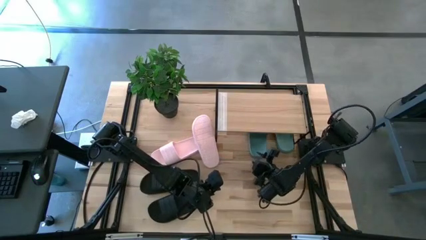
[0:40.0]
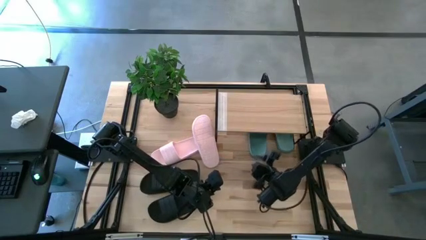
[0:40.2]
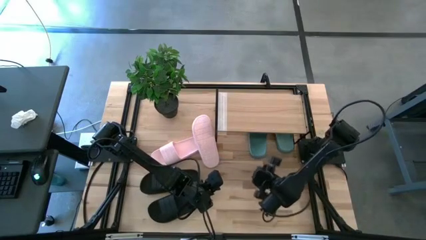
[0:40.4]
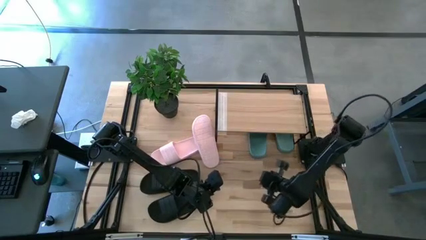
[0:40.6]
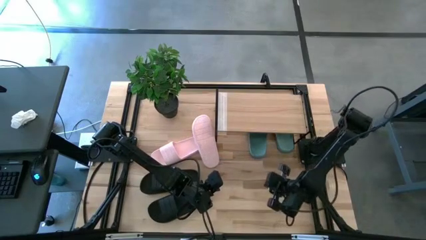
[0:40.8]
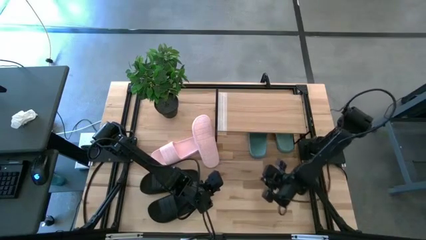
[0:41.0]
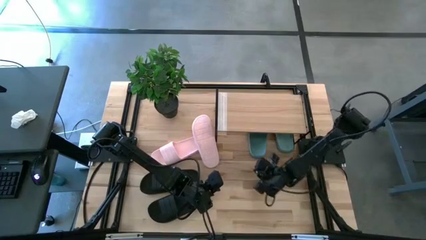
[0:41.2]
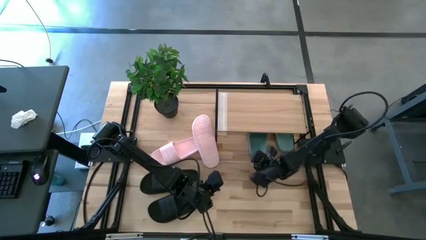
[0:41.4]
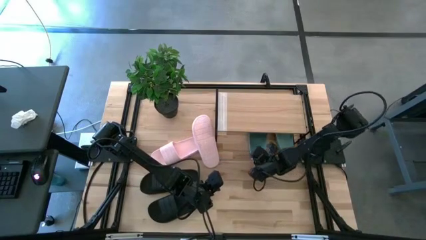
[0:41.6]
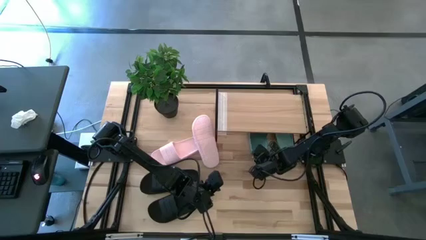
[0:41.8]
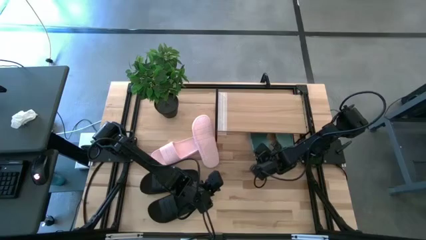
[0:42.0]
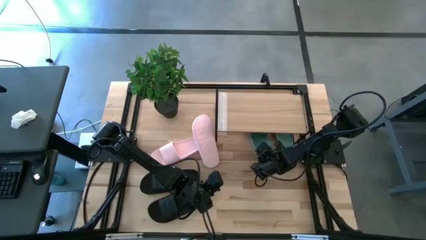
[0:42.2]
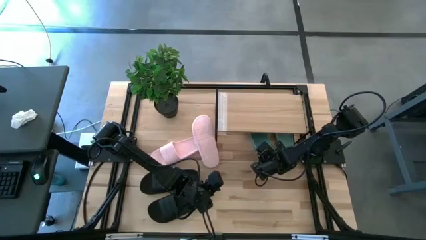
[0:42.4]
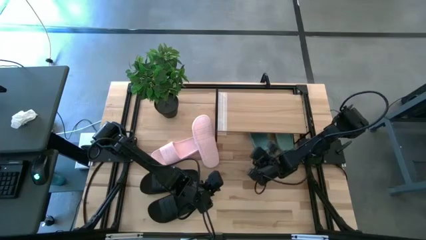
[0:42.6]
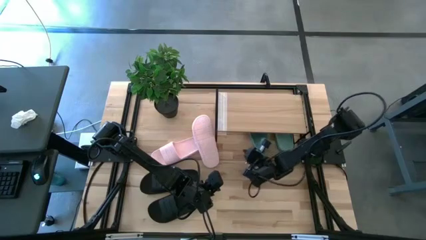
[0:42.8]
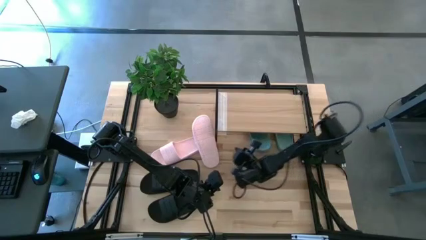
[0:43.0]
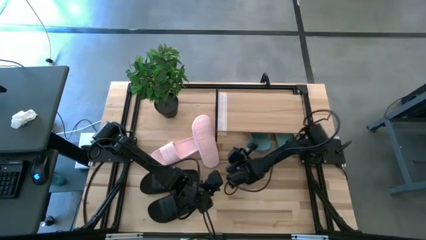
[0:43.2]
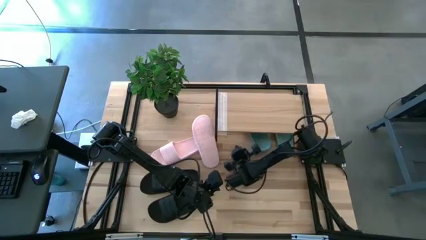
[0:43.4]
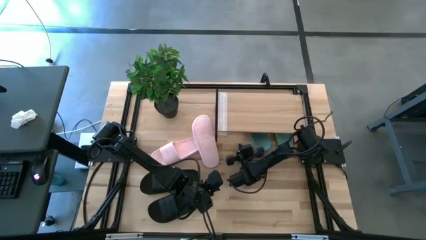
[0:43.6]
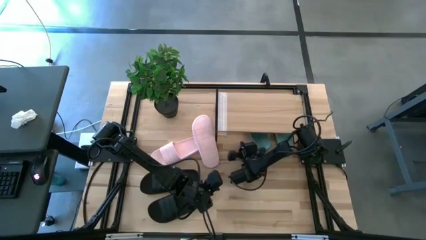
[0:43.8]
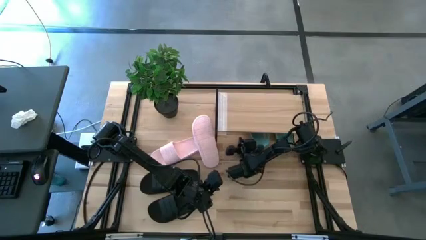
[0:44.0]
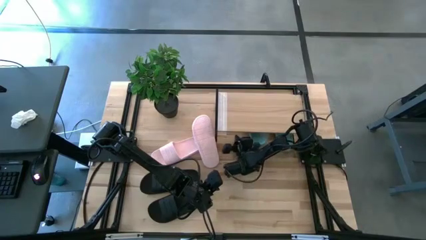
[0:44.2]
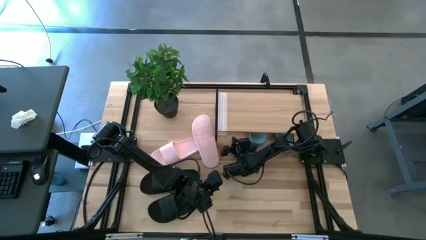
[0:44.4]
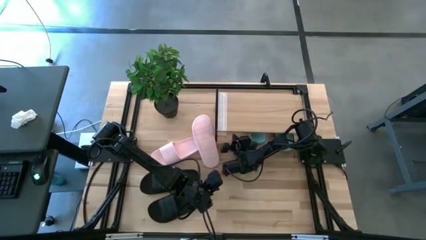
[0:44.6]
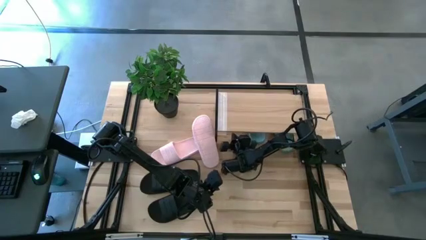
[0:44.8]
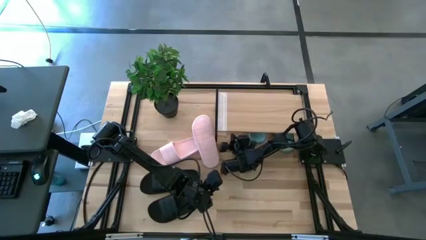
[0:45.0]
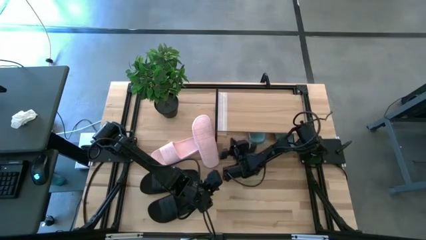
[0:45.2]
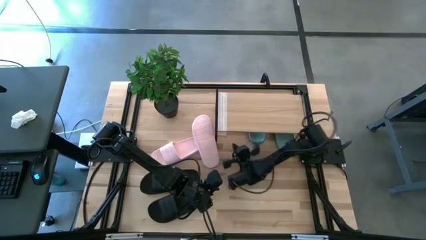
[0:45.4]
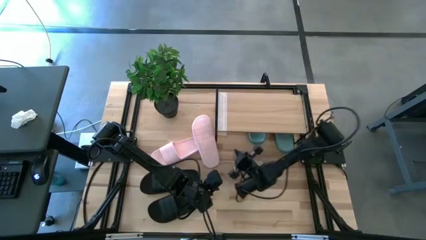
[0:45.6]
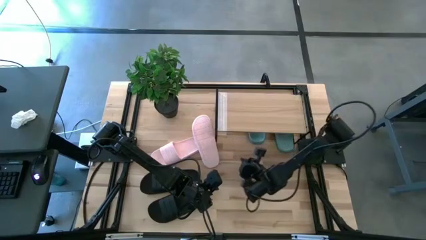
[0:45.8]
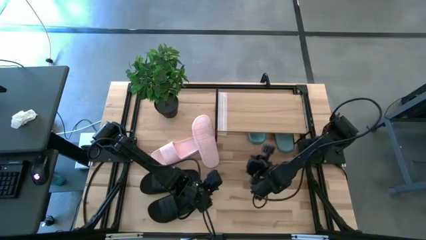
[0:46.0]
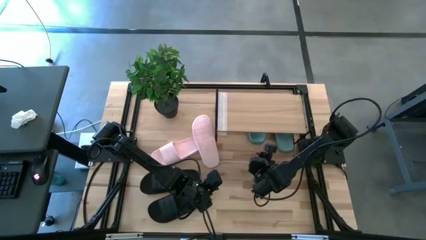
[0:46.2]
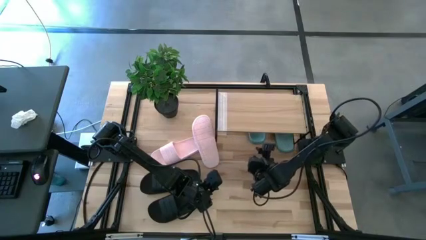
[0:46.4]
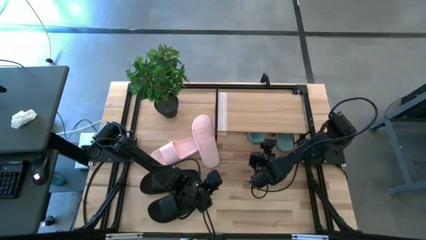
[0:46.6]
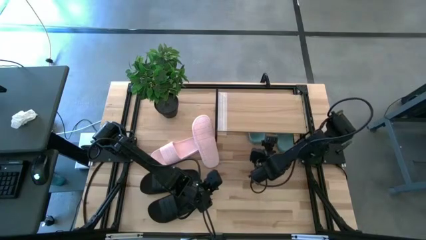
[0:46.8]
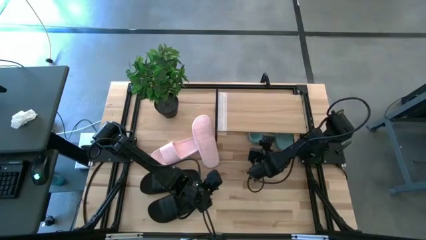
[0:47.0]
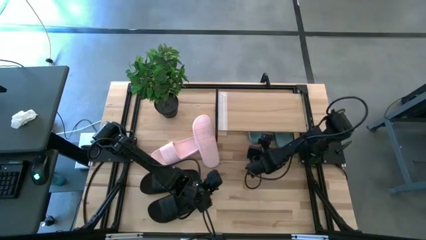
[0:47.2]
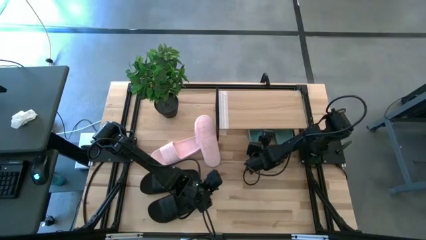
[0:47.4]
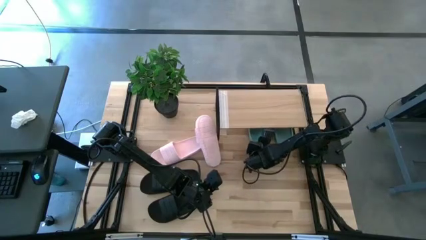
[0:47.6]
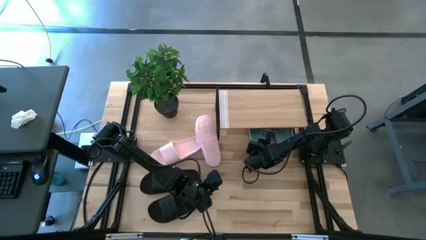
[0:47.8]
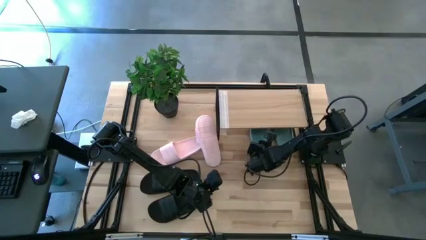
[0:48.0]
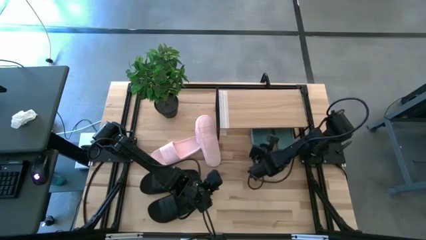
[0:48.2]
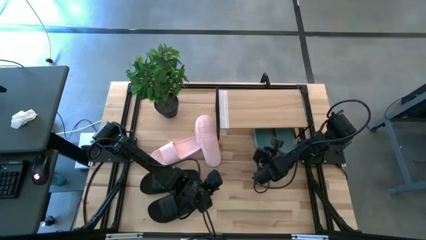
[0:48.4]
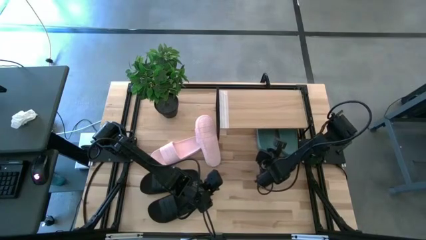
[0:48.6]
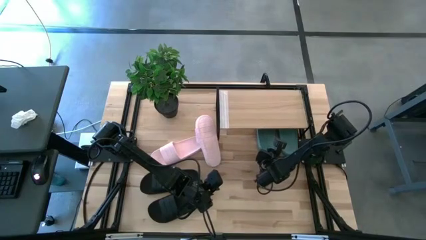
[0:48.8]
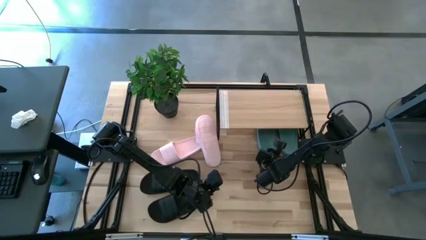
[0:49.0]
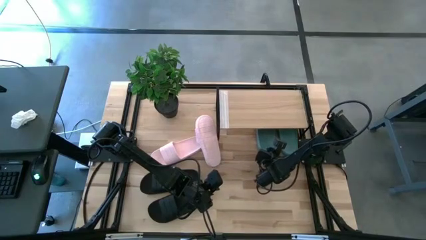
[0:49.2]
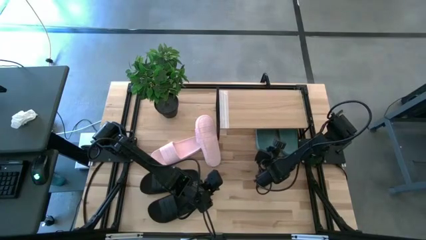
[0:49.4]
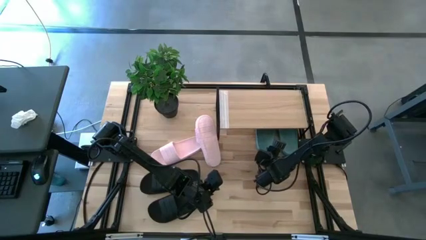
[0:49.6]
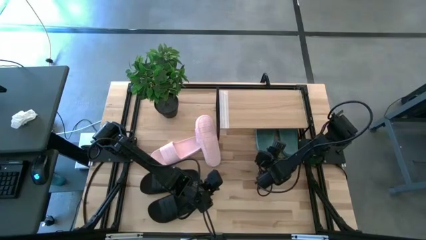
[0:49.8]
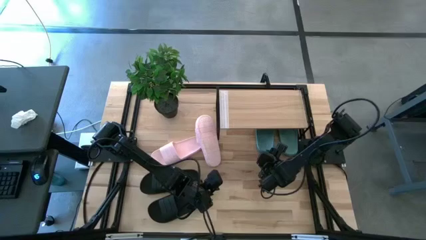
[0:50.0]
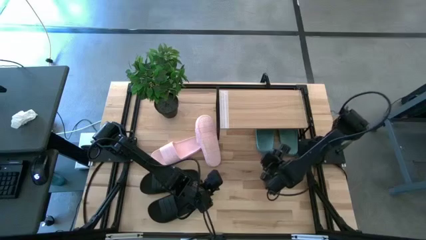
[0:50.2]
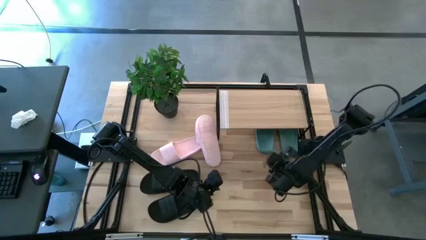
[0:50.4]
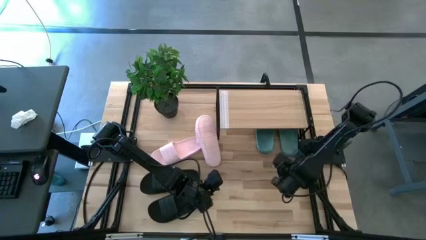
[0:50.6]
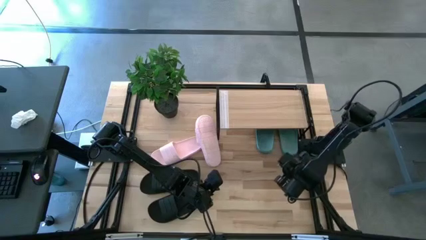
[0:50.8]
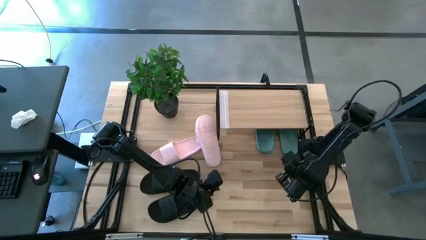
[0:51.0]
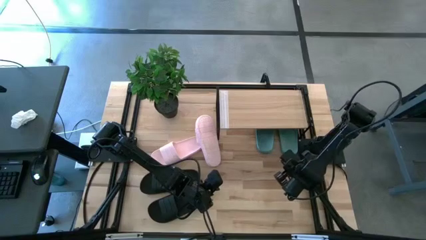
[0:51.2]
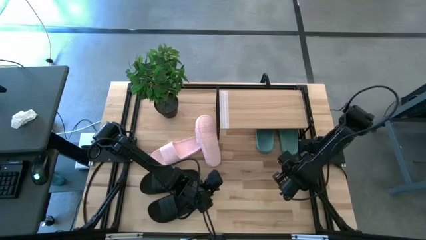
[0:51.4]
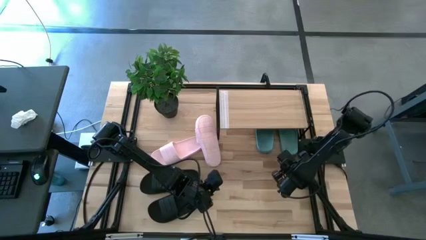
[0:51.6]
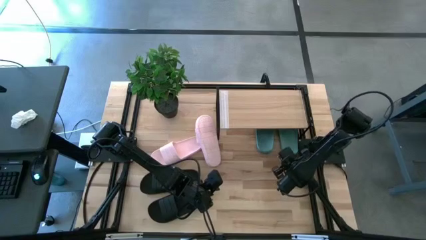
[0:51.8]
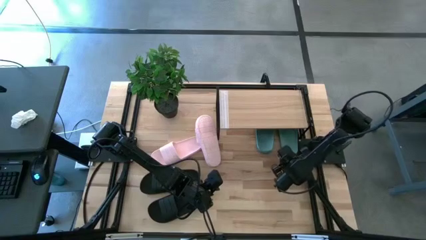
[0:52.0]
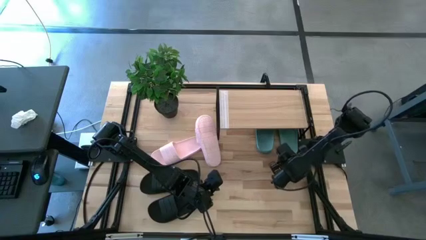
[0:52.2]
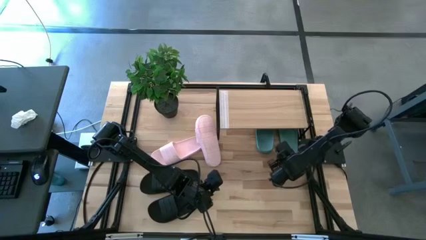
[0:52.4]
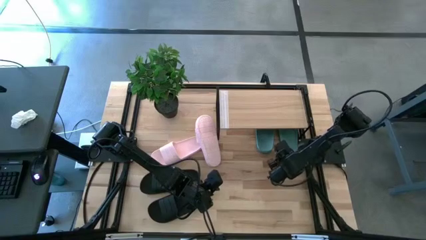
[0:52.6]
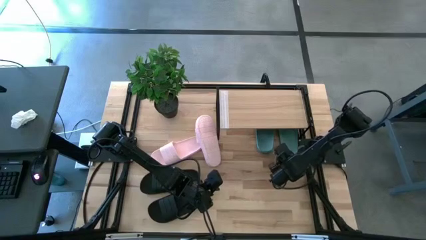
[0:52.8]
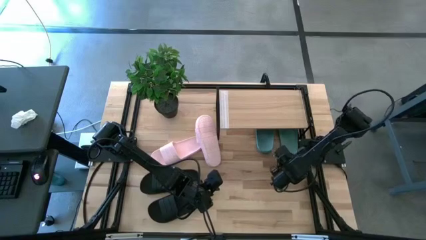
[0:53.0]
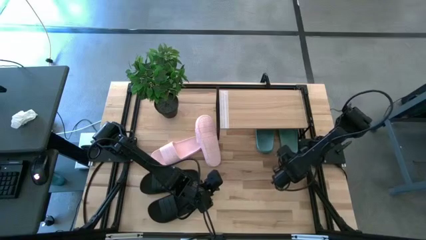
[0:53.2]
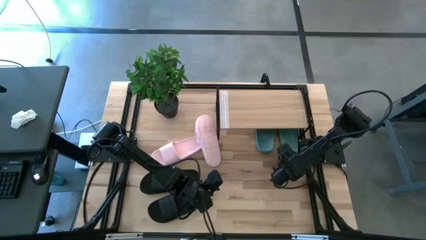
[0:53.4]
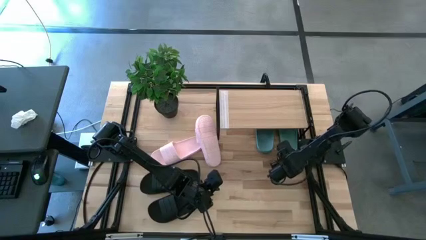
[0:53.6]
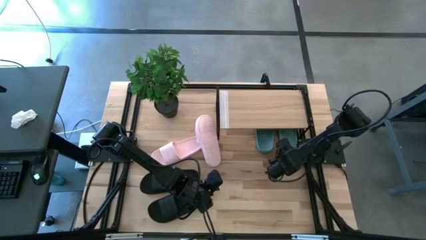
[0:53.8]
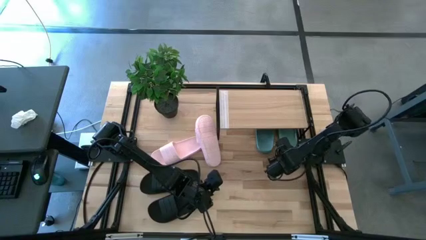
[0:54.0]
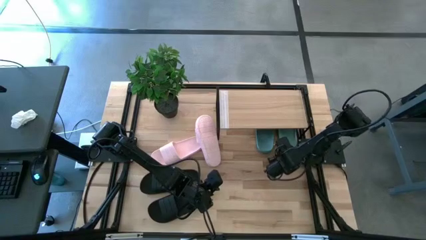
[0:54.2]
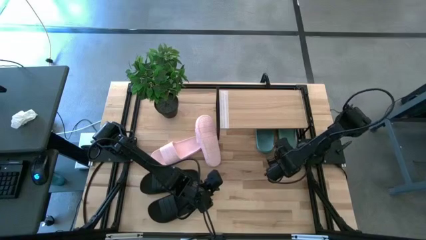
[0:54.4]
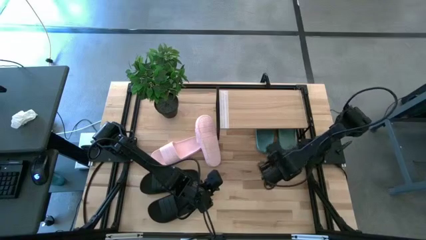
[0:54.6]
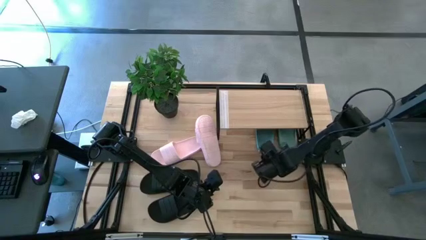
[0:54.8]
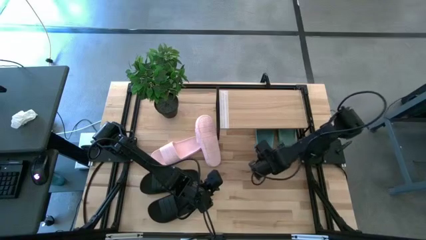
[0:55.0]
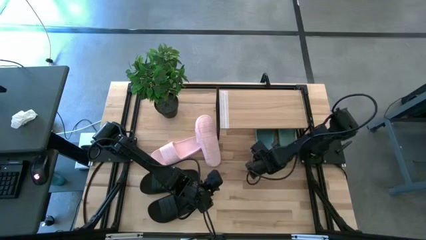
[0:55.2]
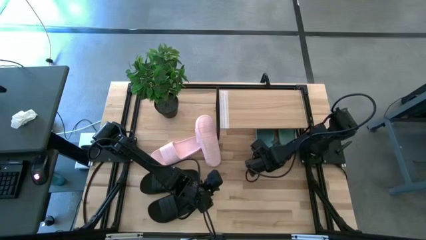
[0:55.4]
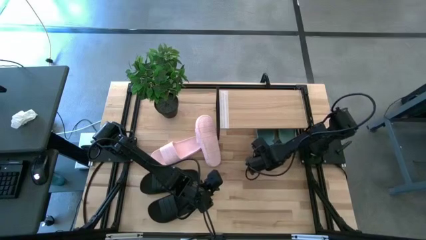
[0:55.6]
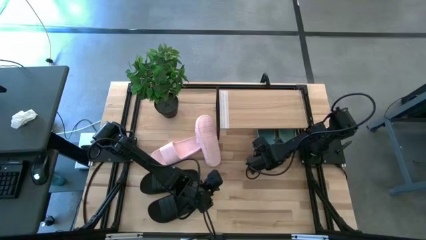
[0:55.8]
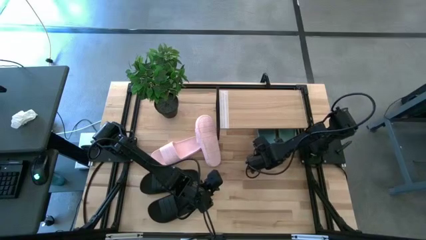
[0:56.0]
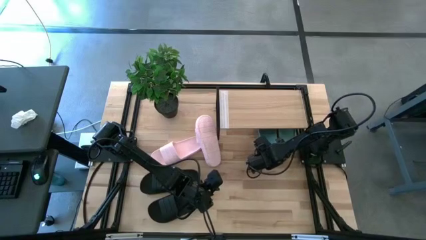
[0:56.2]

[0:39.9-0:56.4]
Task: Pick and place slides into the shelf
Adjust the green slides
